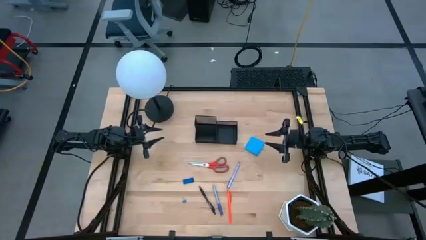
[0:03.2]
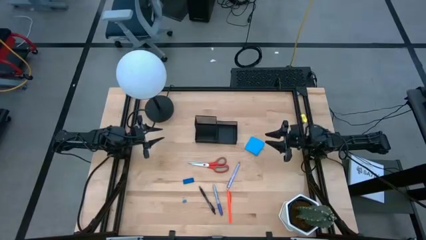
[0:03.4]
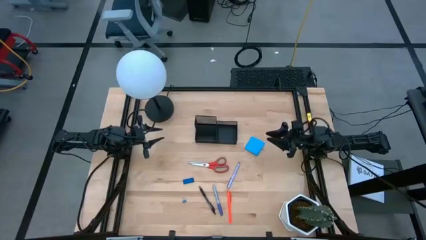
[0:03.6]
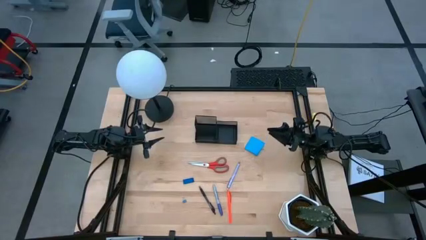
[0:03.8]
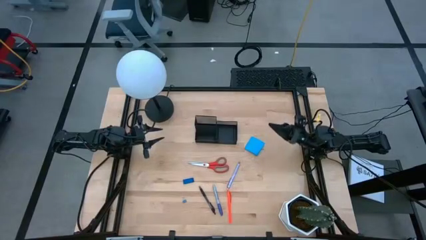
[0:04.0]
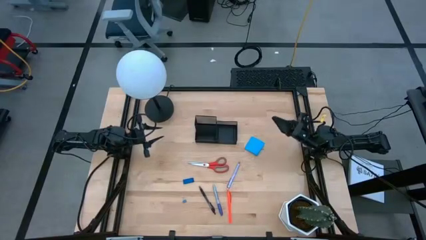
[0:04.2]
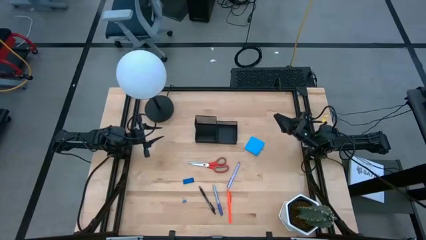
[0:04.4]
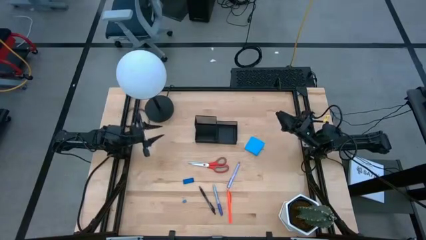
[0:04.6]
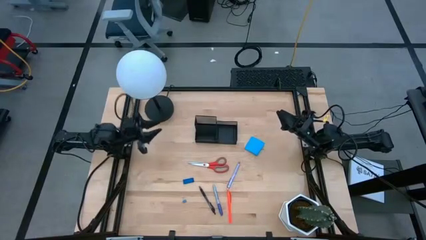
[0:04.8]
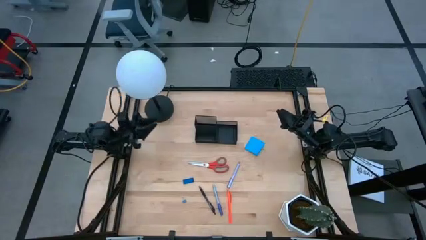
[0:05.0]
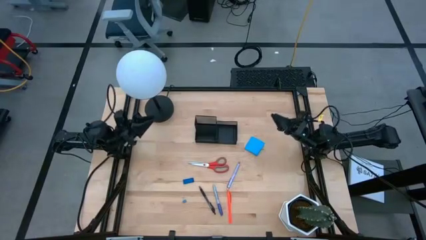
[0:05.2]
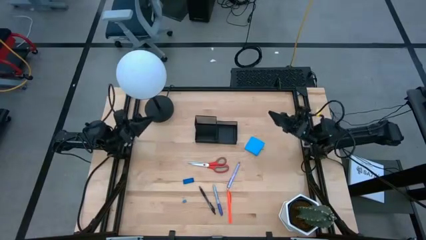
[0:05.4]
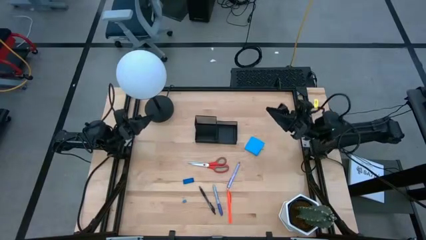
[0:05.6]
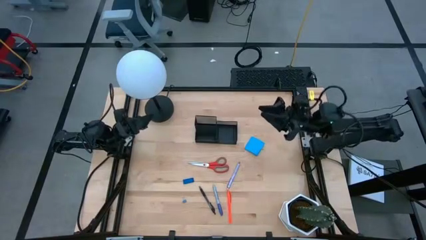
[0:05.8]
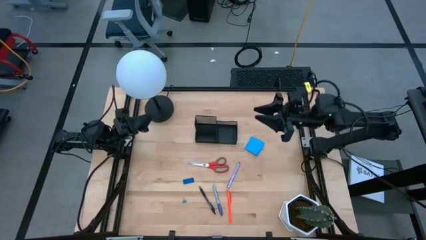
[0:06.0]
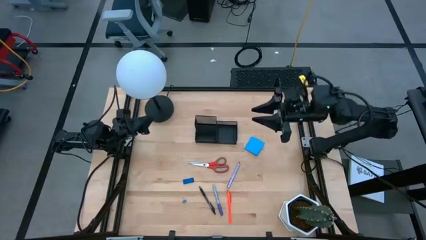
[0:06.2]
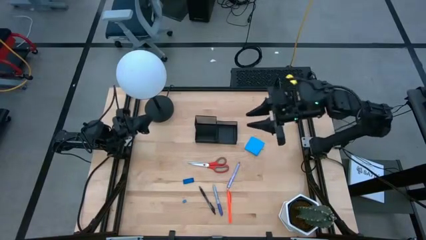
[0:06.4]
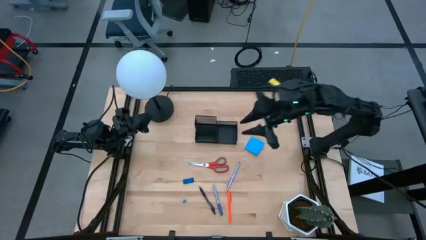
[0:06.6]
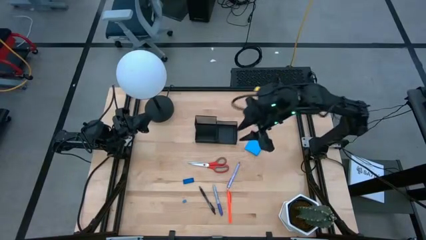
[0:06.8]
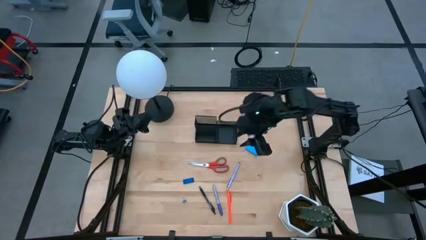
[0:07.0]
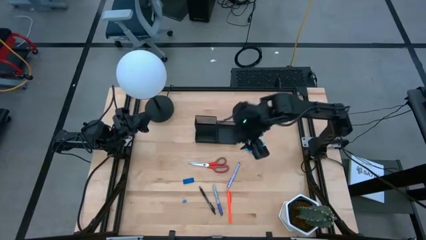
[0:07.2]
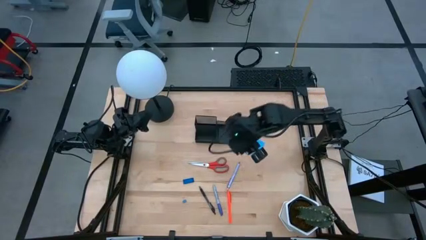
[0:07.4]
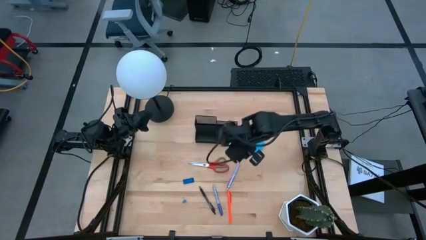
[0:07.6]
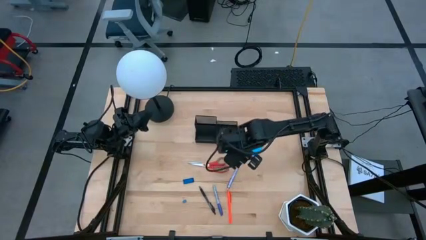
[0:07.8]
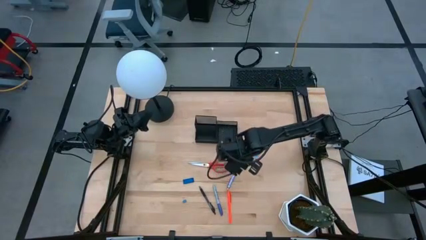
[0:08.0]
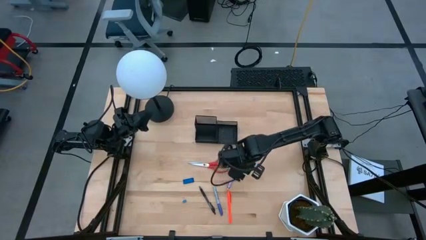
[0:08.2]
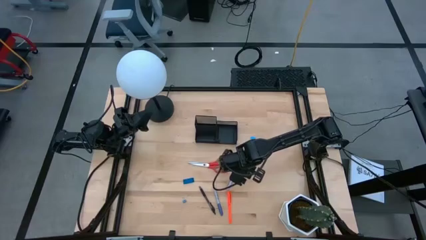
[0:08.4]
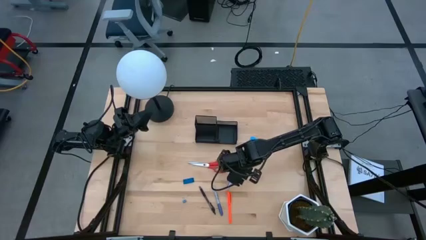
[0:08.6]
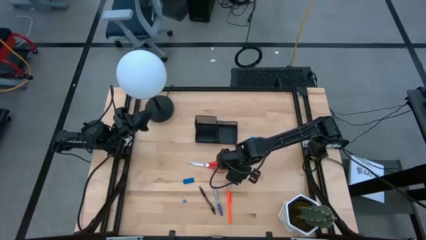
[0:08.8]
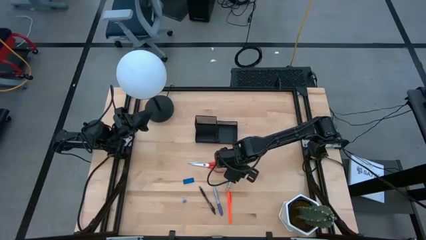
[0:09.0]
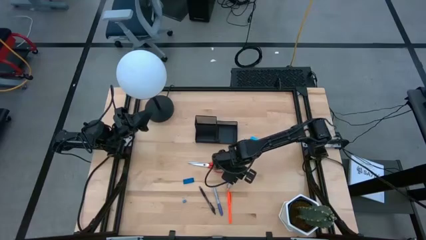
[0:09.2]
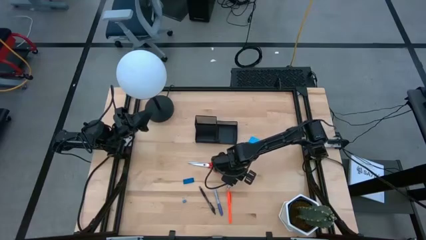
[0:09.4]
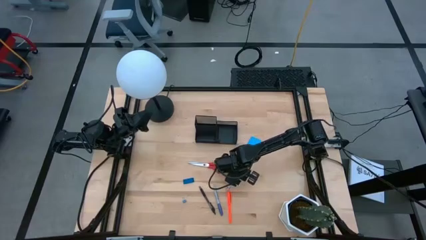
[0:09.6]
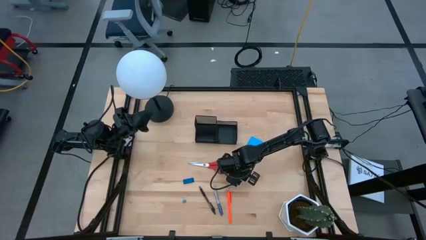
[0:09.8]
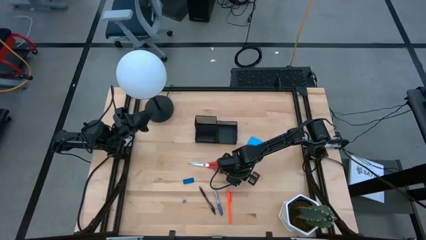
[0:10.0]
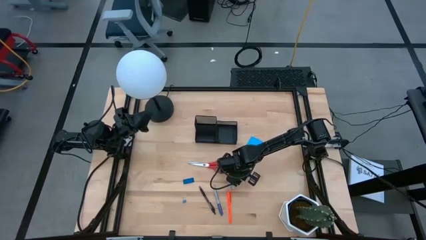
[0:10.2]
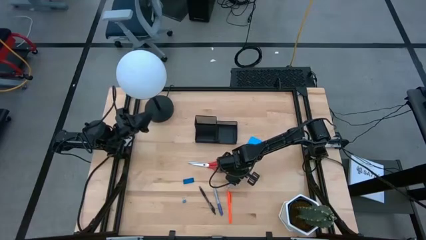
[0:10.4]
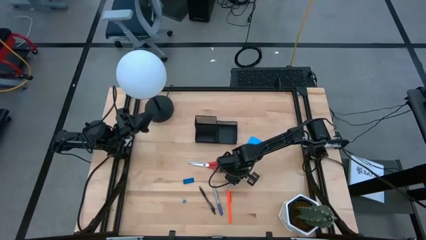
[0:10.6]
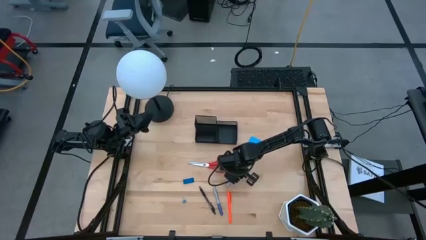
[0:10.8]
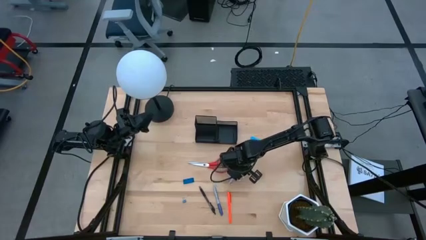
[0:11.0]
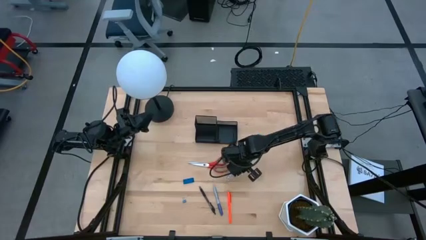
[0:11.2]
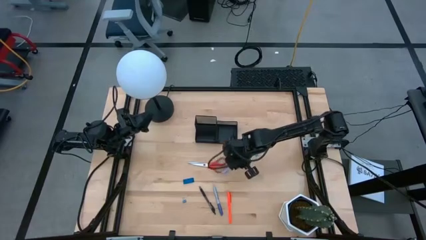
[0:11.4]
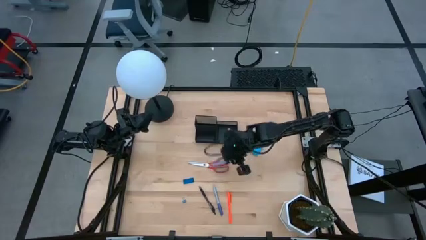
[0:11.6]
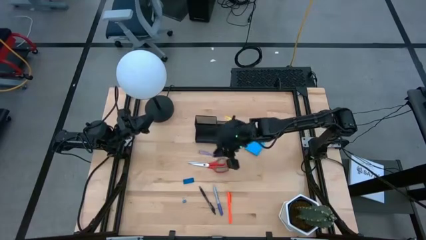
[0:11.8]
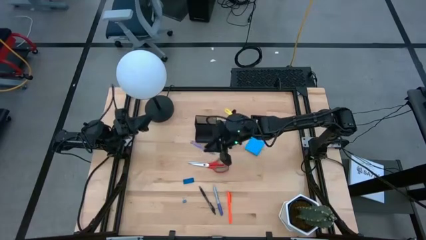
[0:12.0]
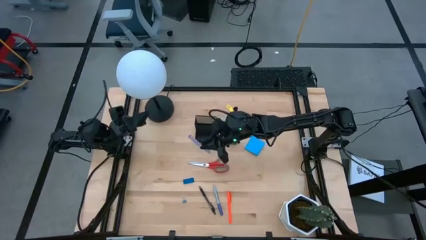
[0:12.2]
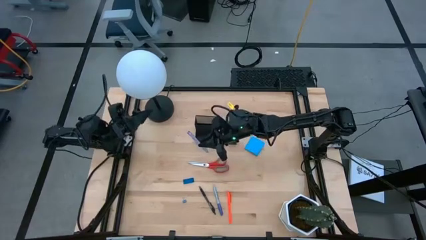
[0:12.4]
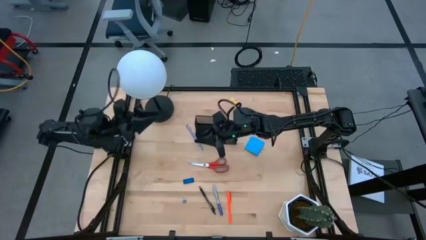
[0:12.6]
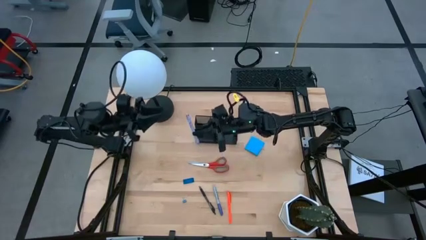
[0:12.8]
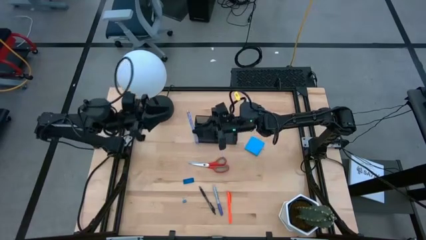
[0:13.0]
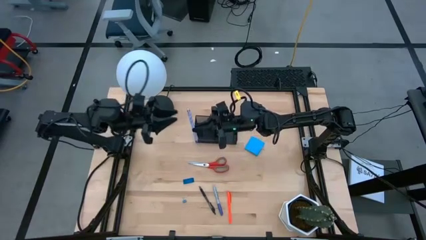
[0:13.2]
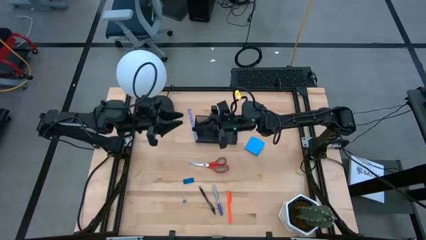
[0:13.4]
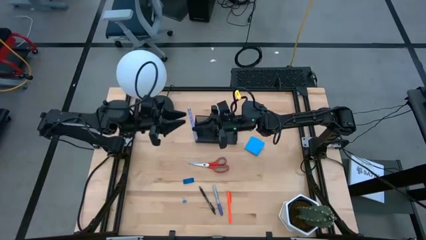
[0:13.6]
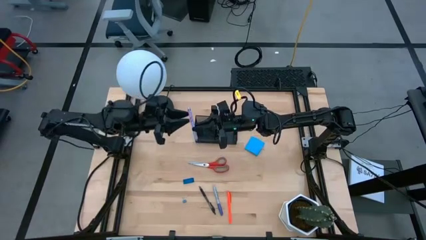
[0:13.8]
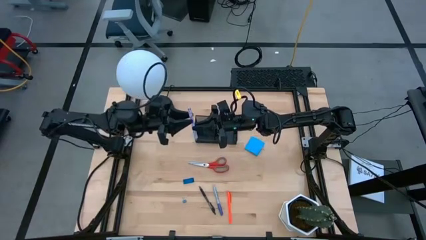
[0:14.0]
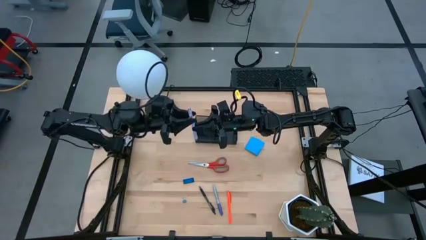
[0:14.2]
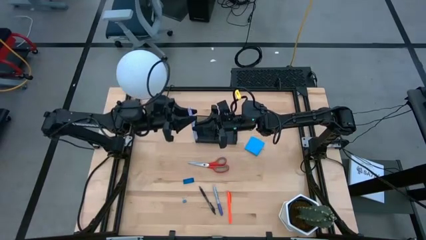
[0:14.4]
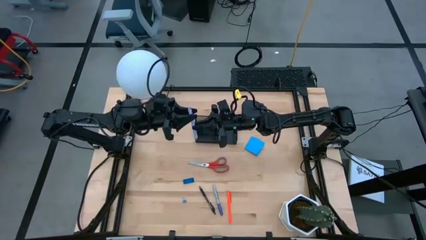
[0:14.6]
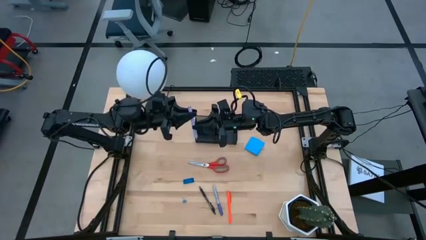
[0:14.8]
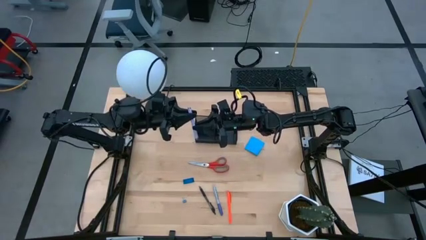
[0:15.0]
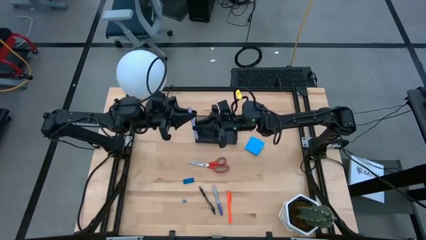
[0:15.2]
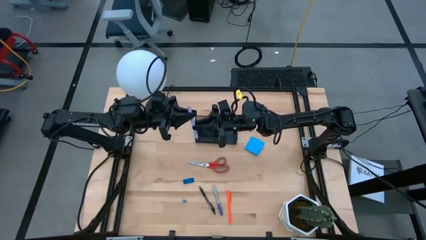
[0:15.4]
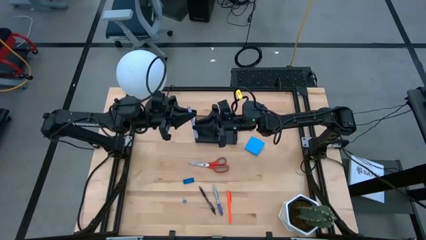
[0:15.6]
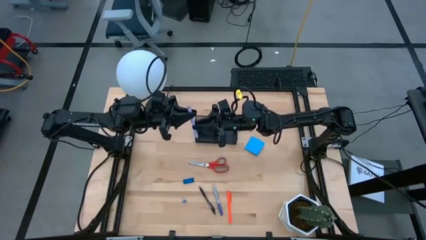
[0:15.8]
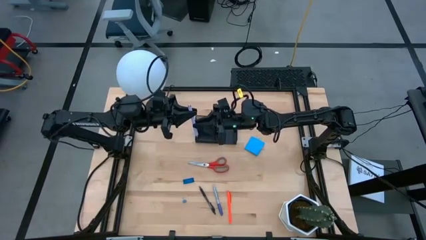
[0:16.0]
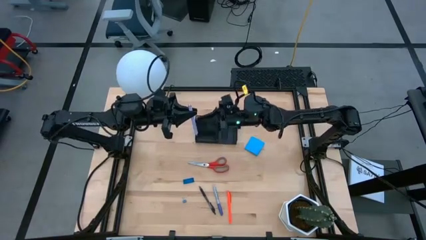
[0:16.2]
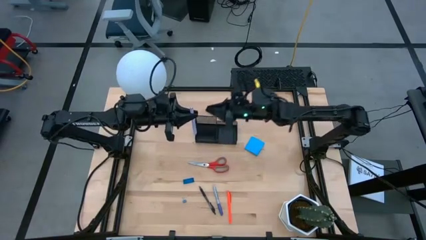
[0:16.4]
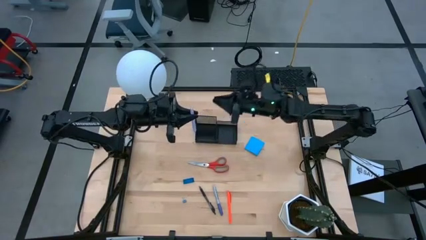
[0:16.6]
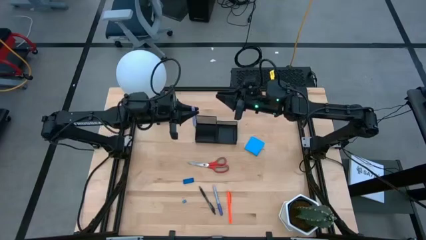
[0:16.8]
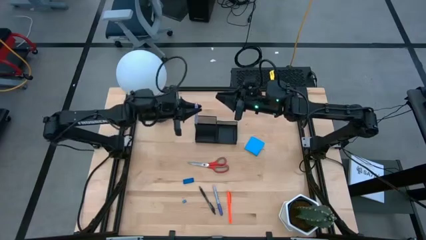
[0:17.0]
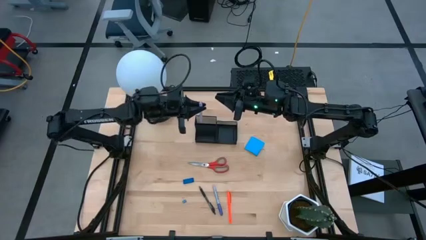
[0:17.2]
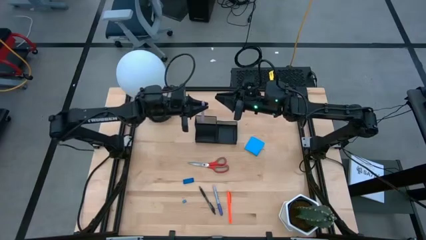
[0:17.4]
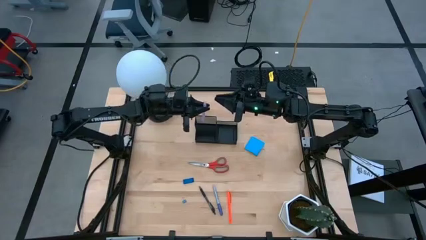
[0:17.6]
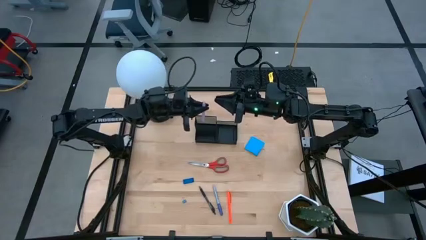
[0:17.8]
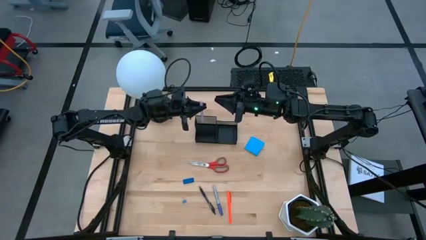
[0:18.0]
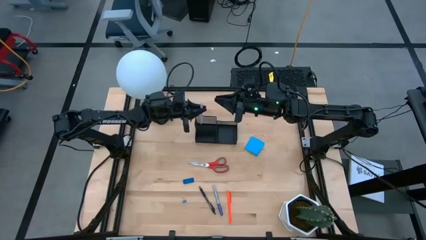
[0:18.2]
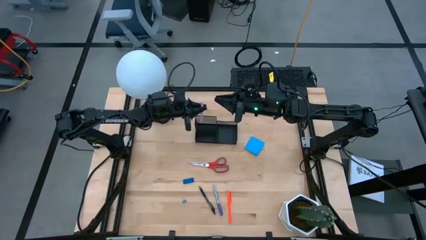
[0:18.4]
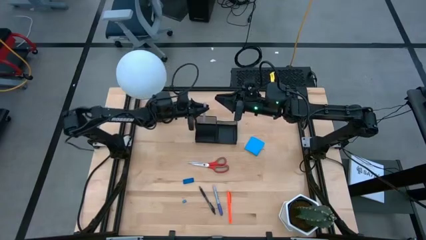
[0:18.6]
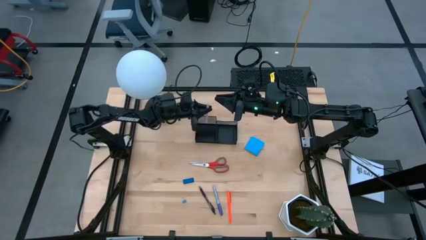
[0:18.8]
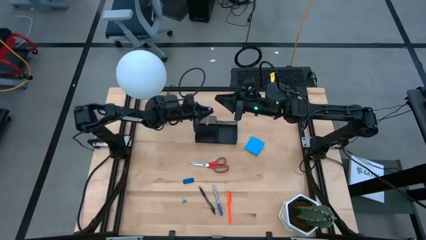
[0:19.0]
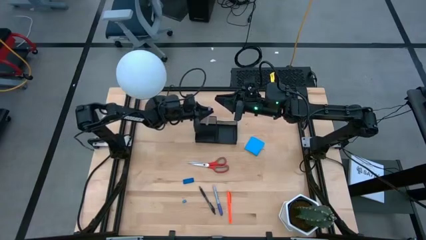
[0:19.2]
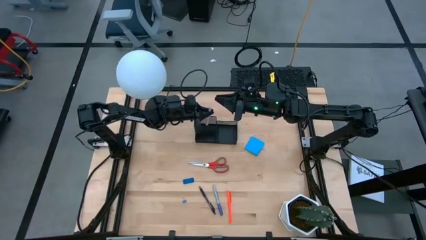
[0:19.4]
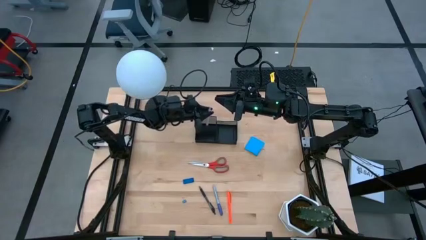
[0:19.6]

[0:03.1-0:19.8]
Task: Pick and place office supplies into organizer
Put the purple pen into the black desk organizer
